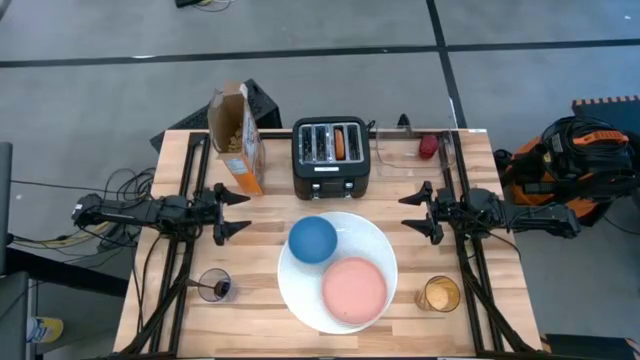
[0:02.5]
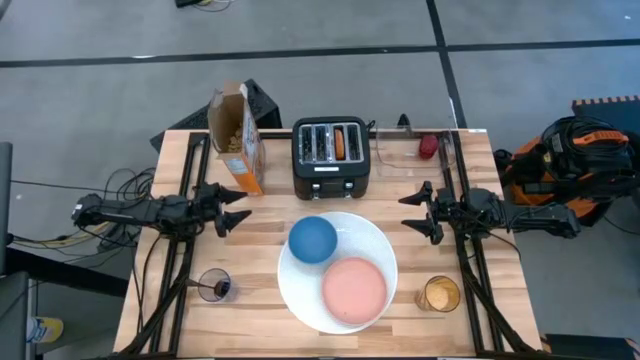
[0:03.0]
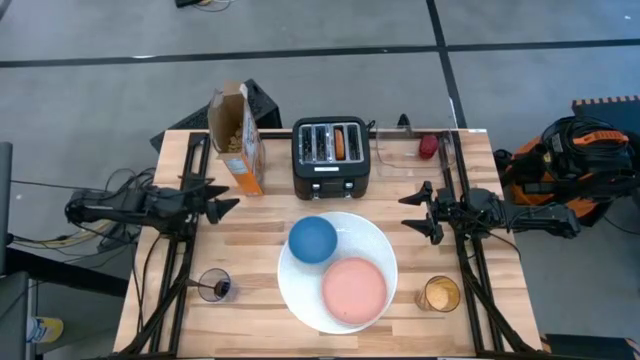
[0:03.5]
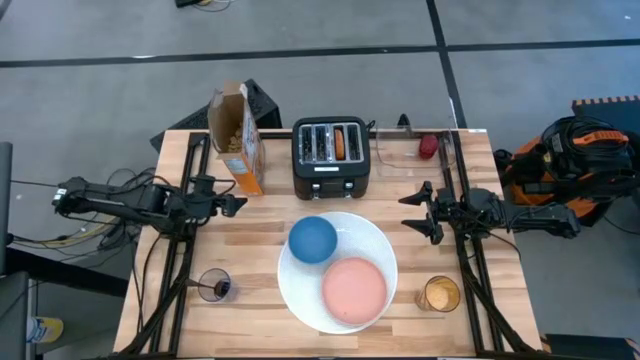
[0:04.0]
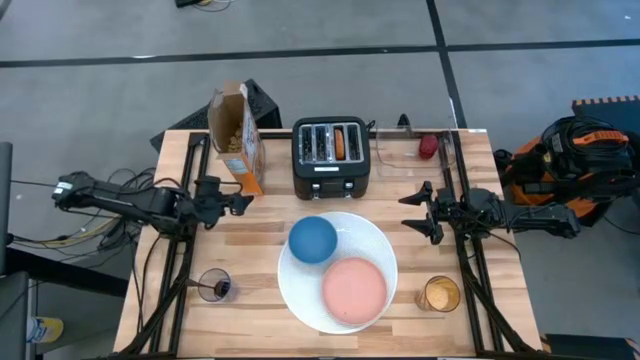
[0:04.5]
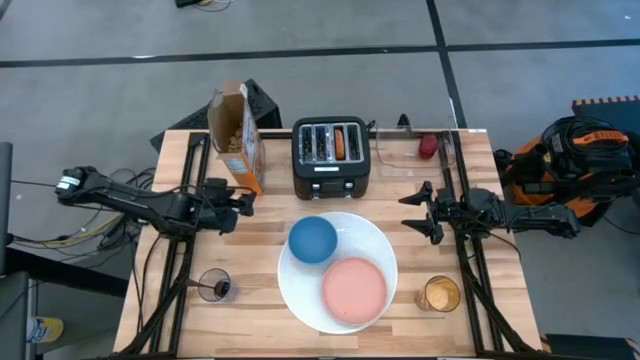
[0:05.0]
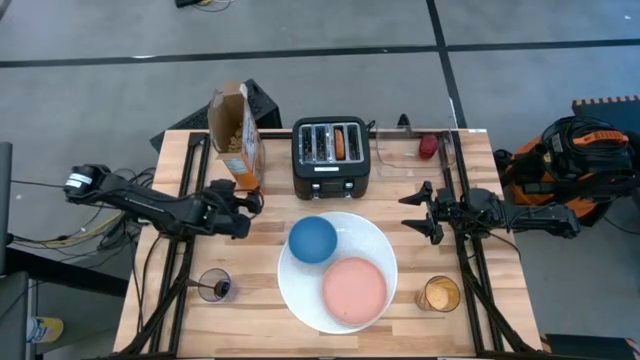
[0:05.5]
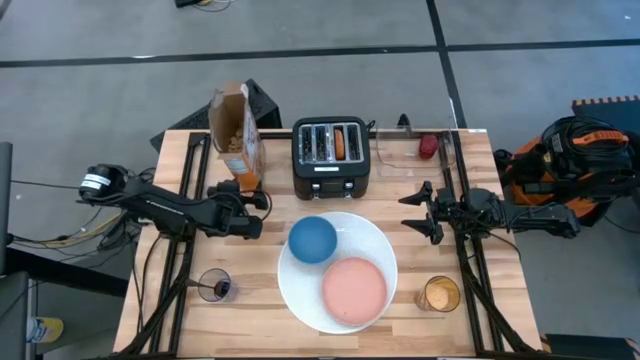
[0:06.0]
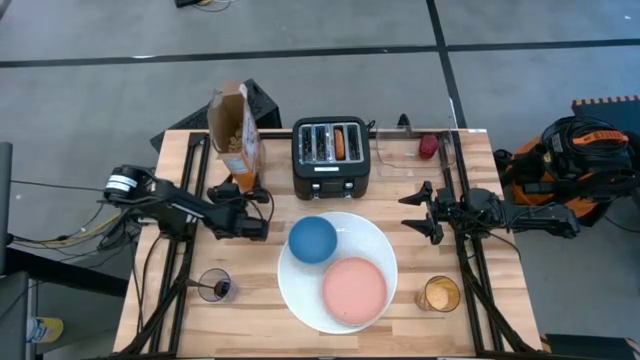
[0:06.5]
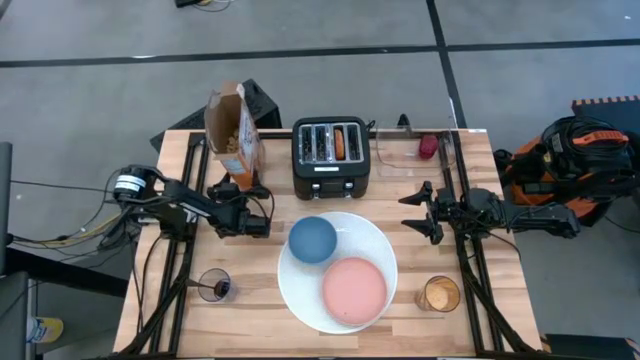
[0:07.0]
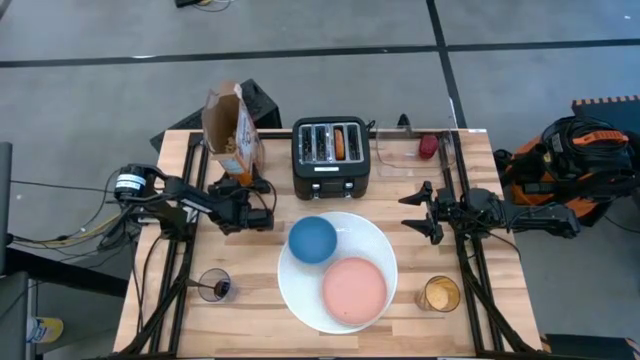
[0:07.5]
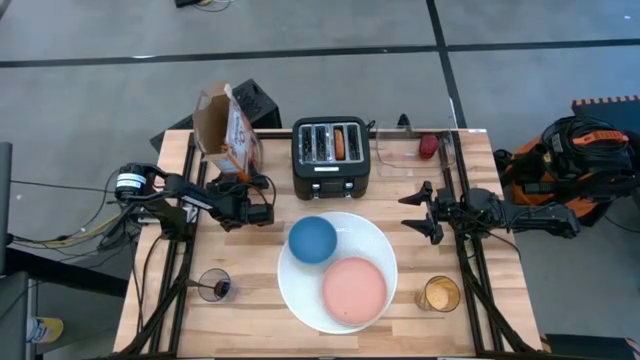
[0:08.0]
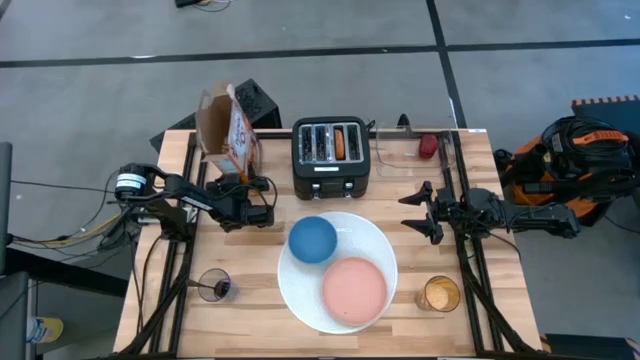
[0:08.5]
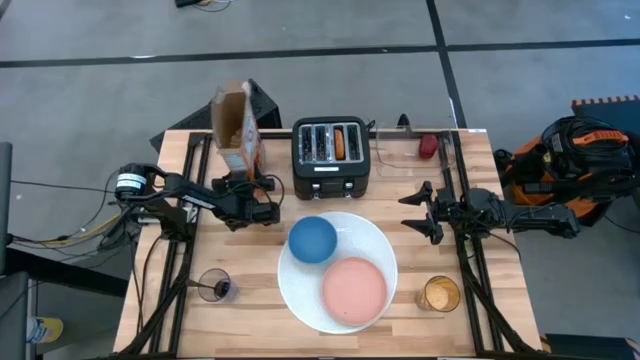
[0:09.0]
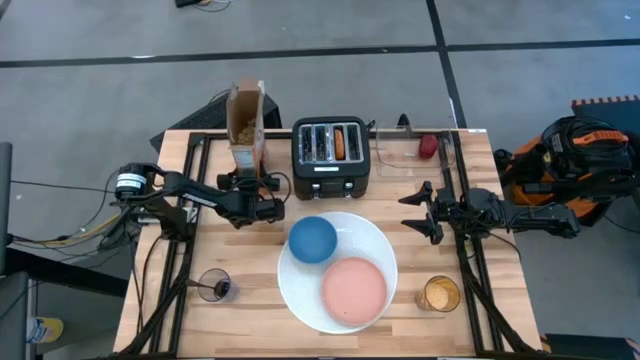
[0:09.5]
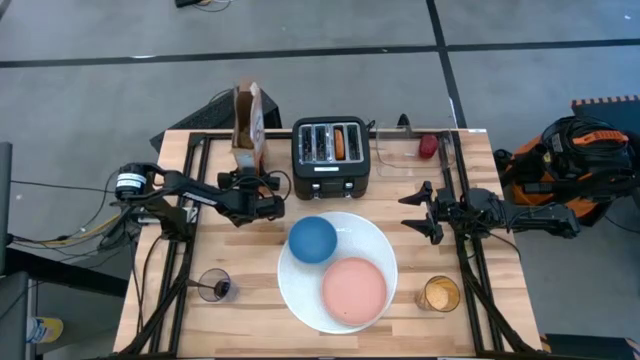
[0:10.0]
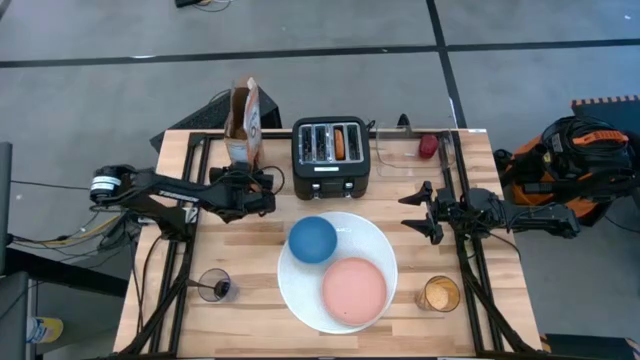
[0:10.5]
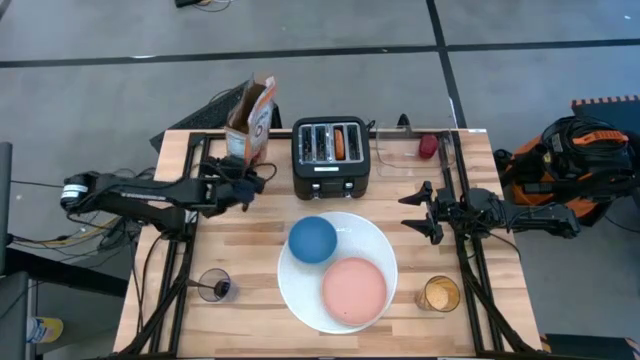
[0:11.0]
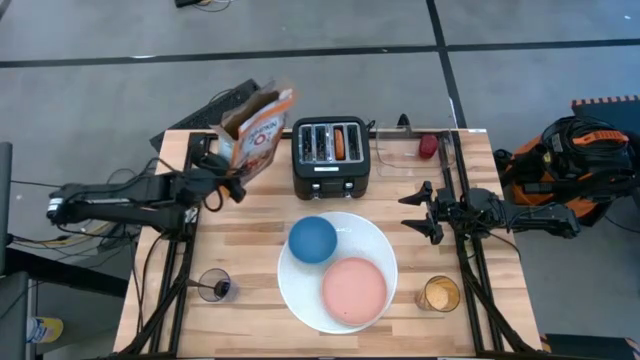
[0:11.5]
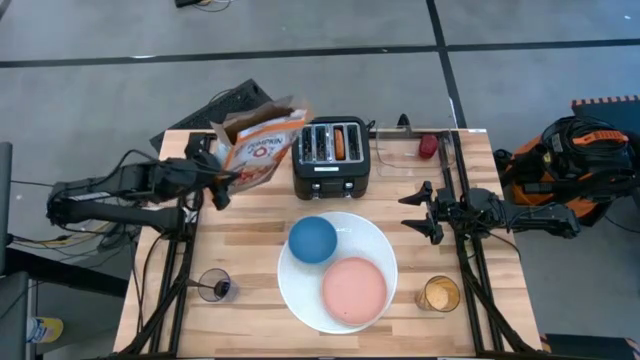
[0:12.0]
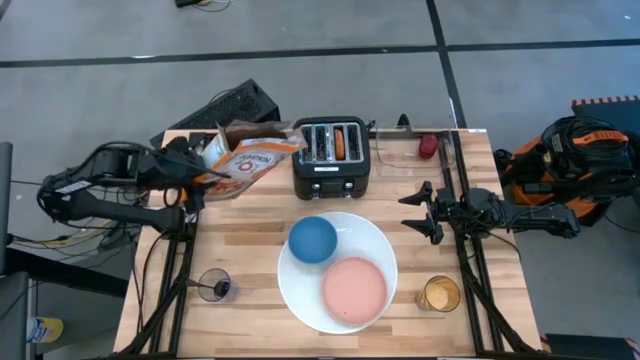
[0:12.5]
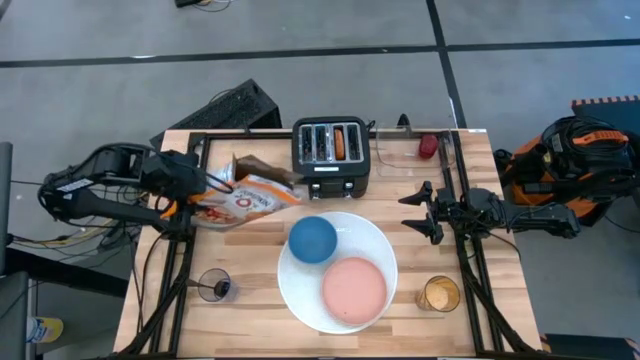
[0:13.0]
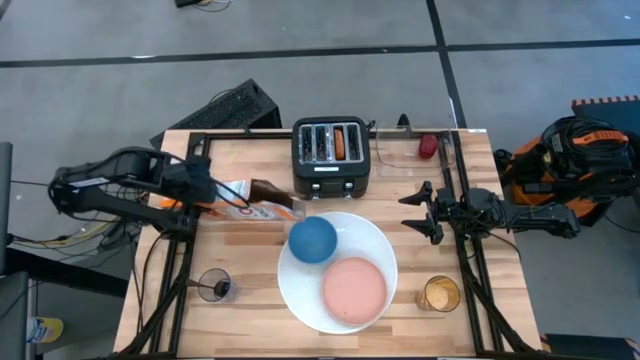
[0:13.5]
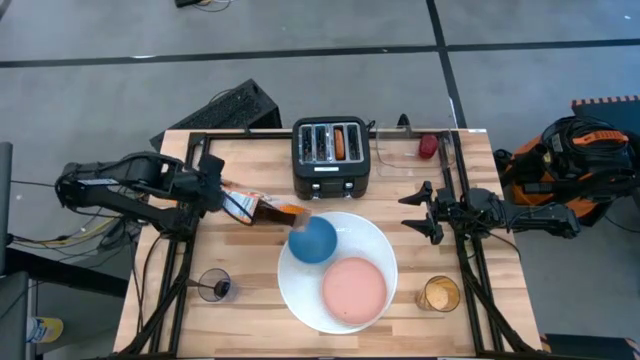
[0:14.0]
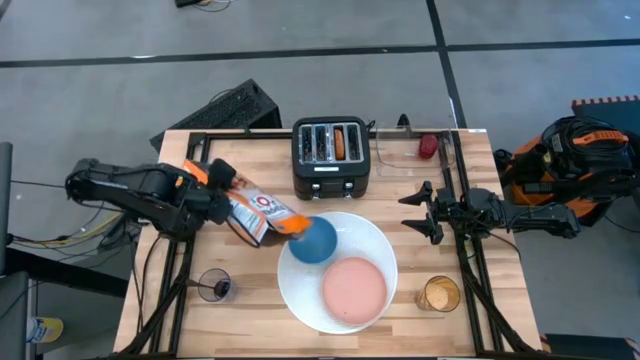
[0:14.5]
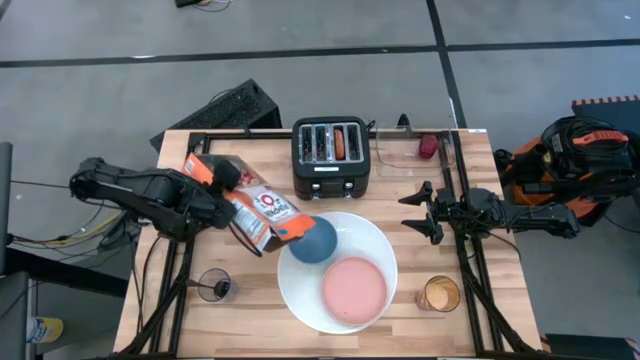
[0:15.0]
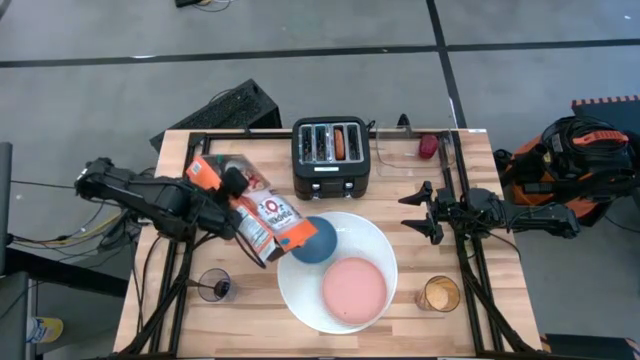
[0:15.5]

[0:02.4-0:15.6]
Task: Arrange a breakfast setting
Pour the cereal into the blue bowl

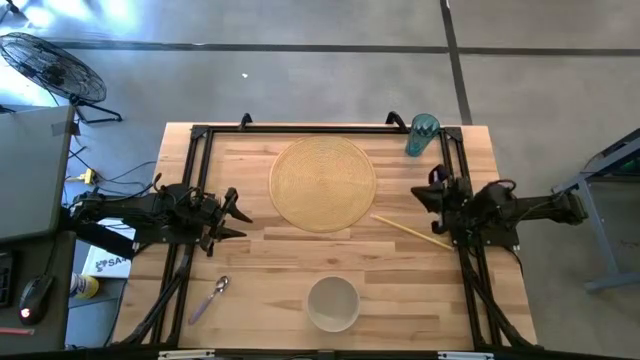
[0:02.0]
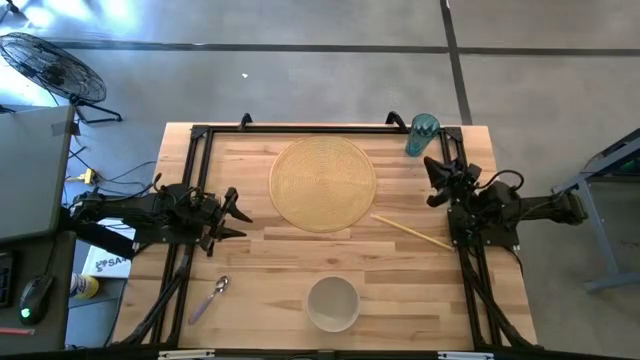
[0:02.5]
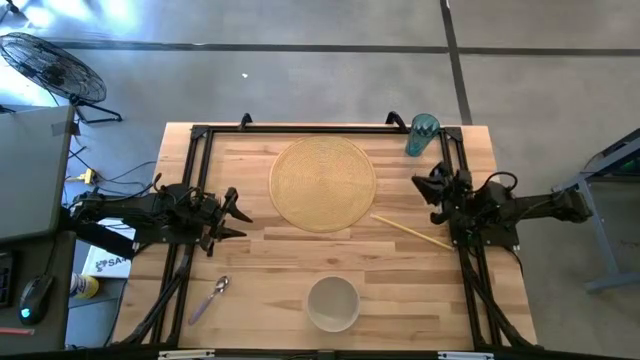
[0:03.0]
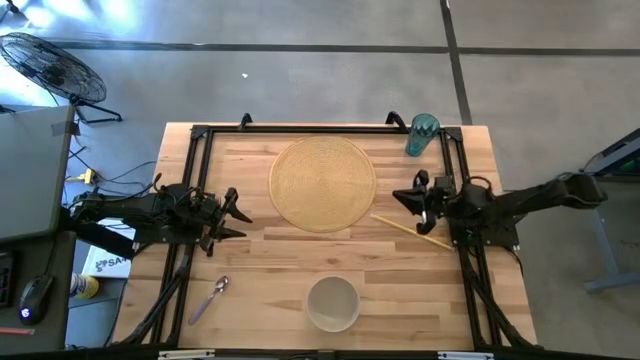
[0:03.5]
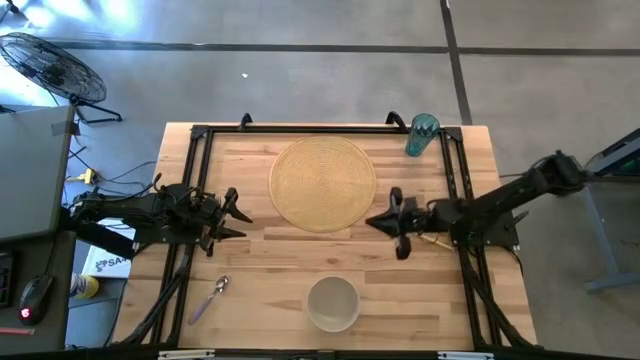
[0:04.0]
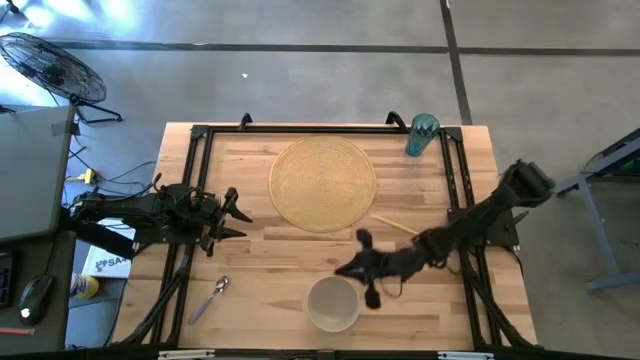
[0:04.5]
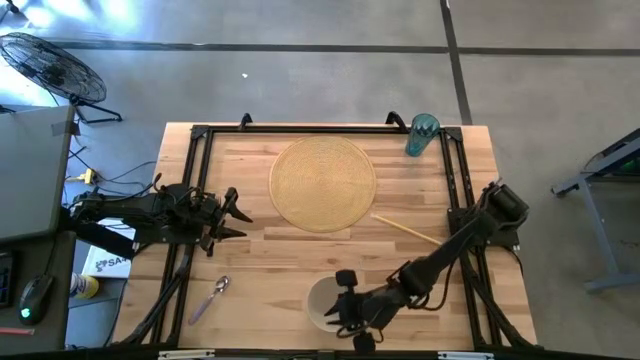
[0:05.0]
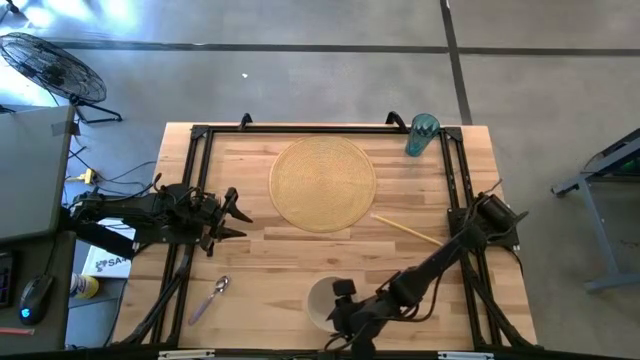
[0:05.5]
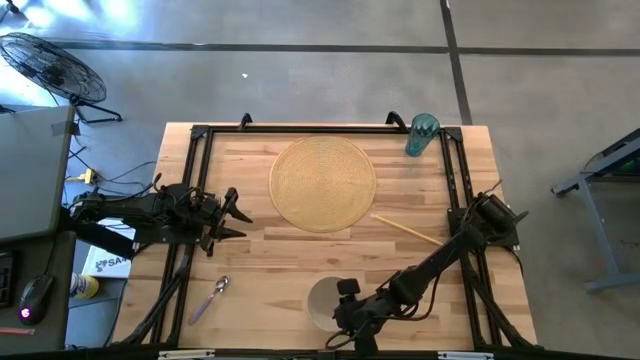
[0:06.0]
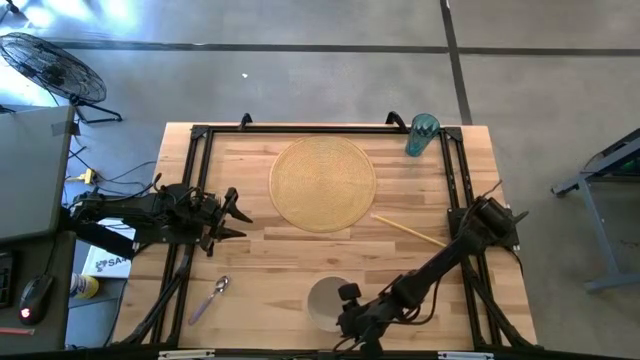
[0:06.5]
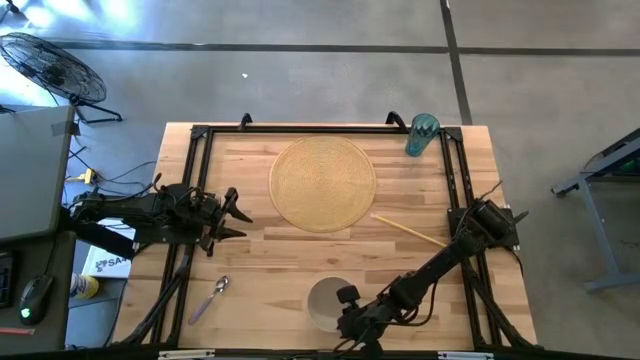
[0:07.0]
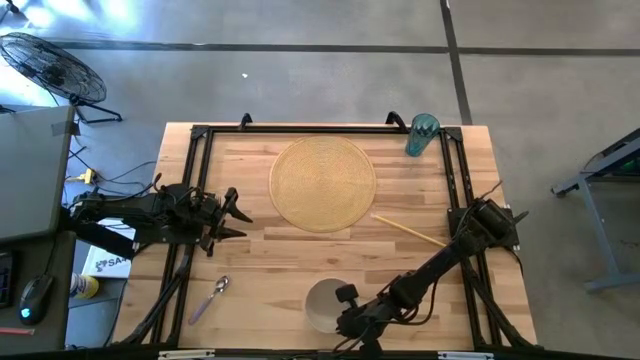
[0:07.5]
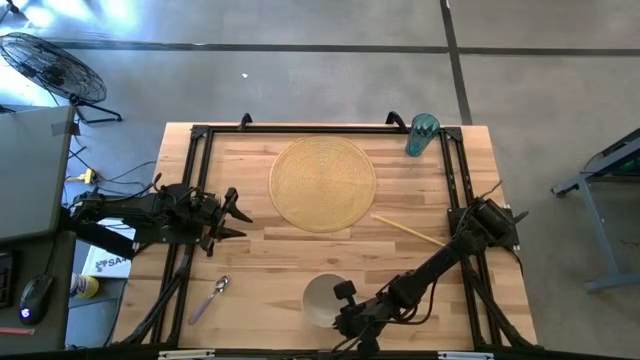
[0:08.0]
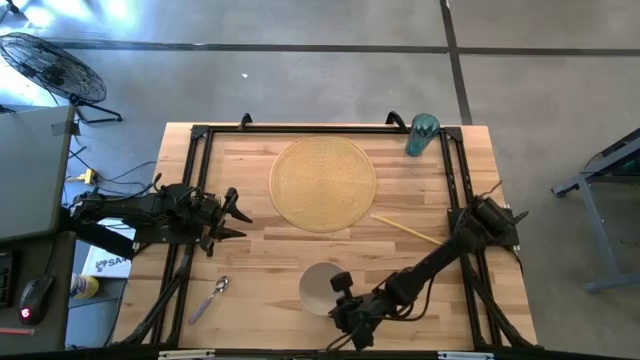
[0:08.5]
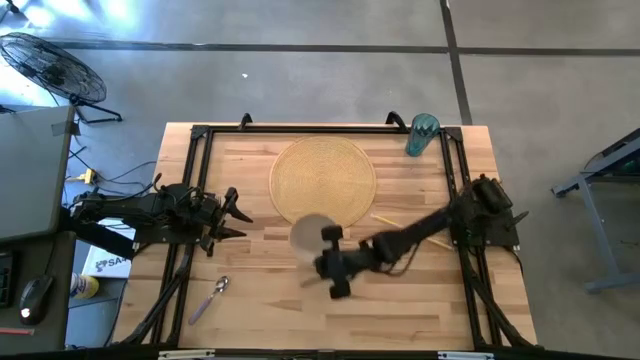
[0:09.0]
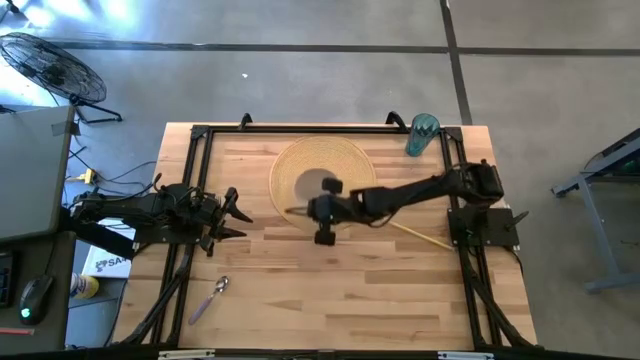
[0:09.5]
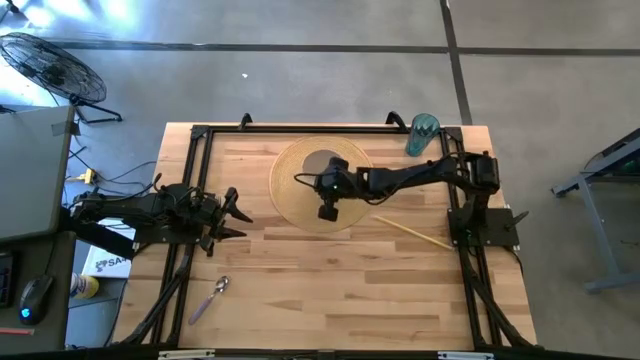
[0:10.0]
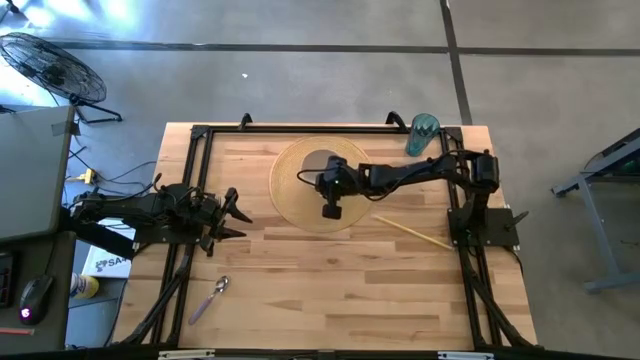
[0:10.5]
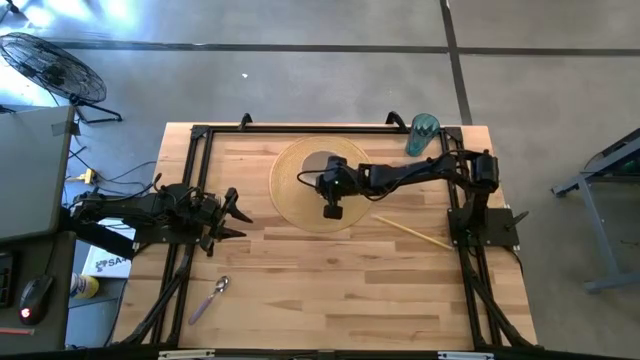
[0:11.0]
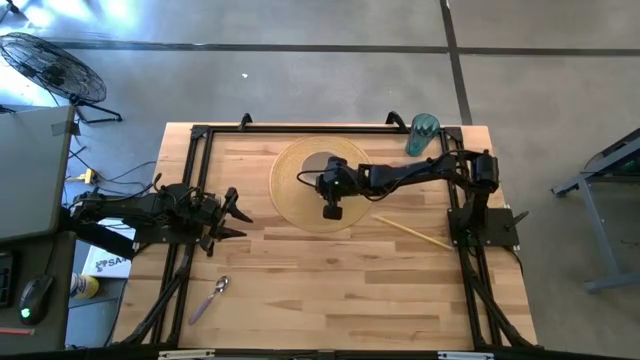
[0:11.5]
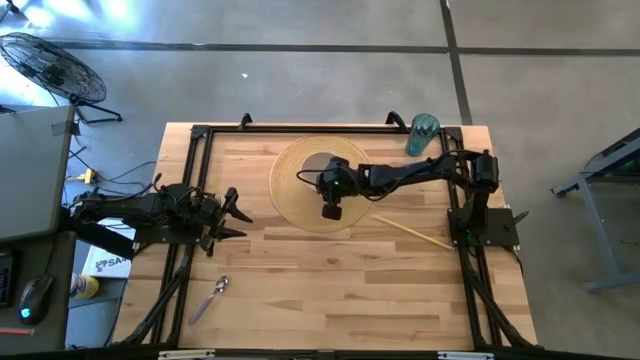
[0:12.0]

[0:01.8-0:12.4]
Task: Pick & Place Utensil
Put the white bowl on the brown mat
